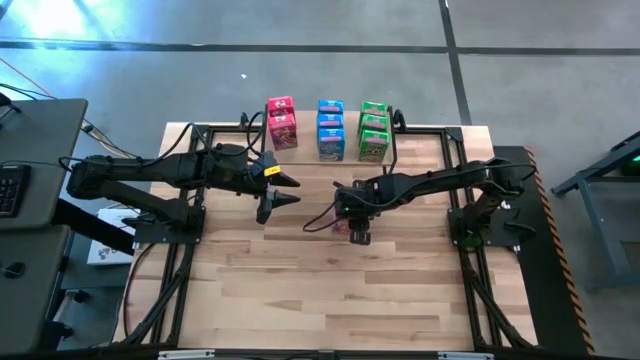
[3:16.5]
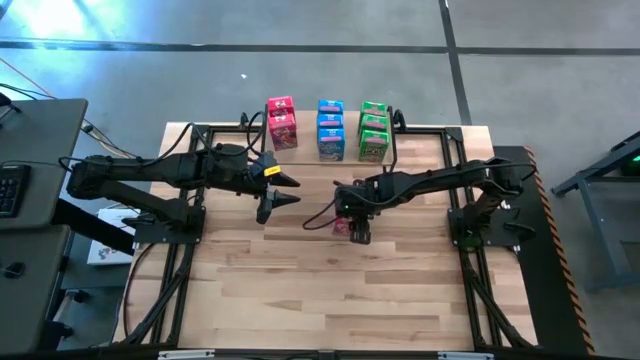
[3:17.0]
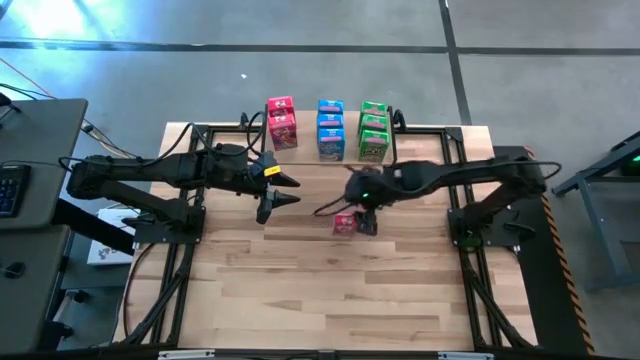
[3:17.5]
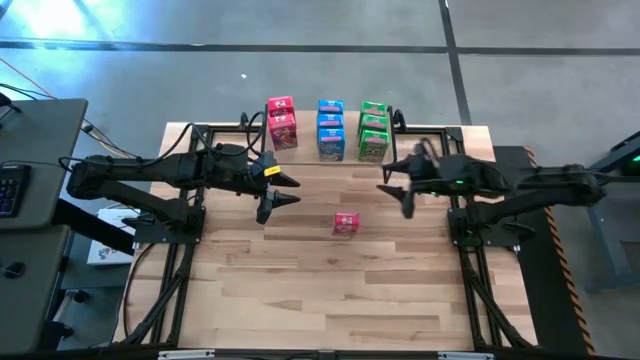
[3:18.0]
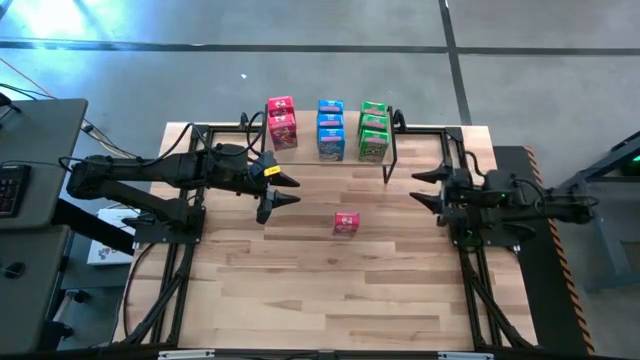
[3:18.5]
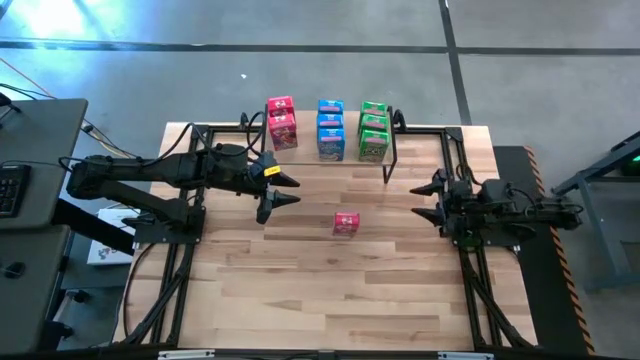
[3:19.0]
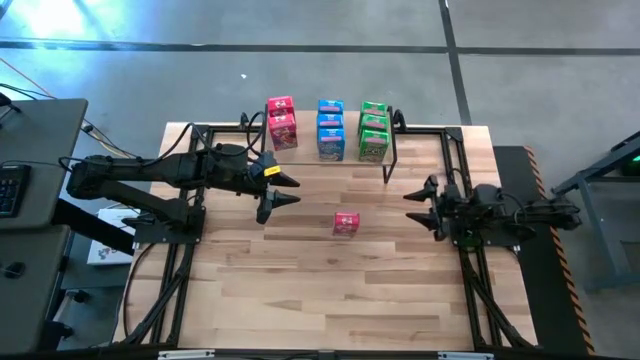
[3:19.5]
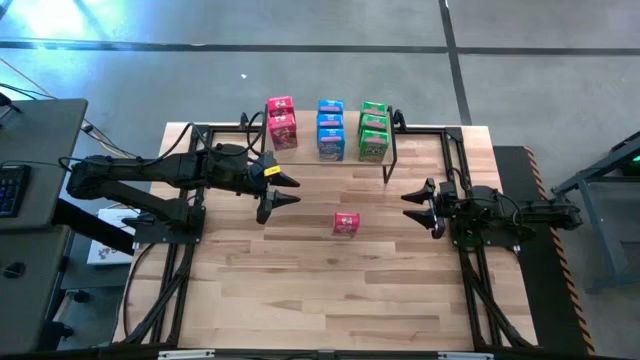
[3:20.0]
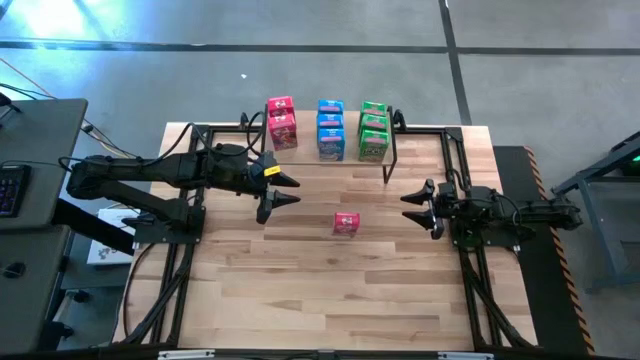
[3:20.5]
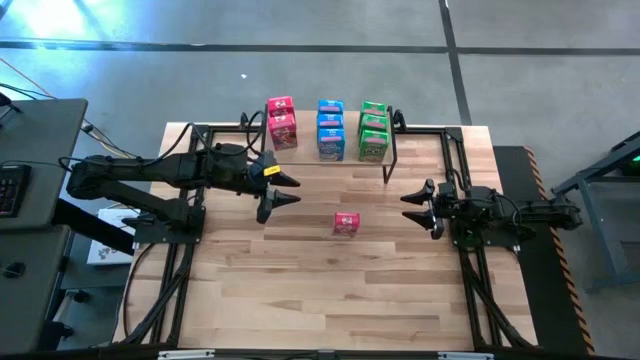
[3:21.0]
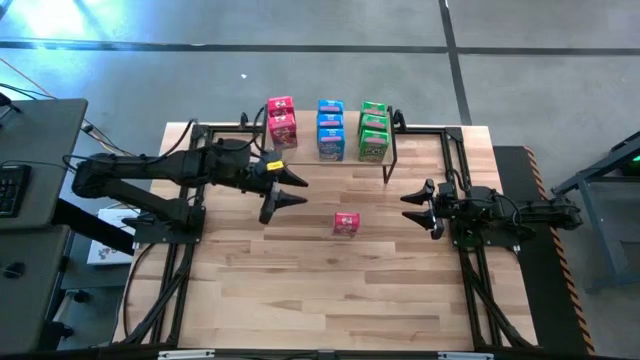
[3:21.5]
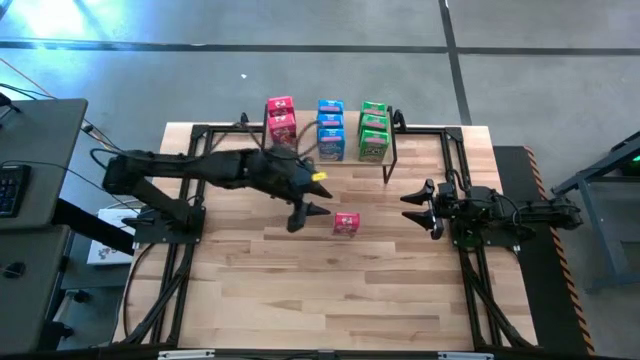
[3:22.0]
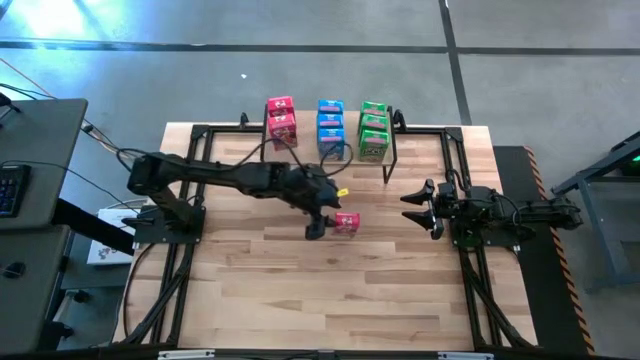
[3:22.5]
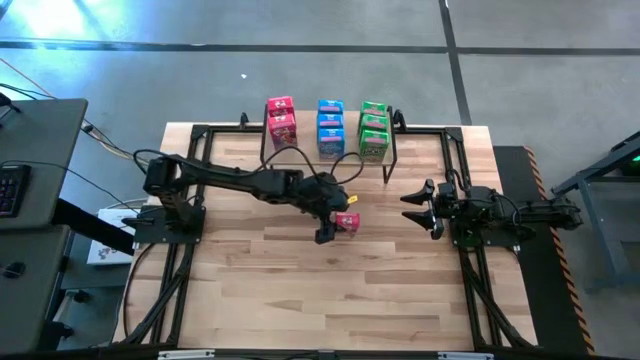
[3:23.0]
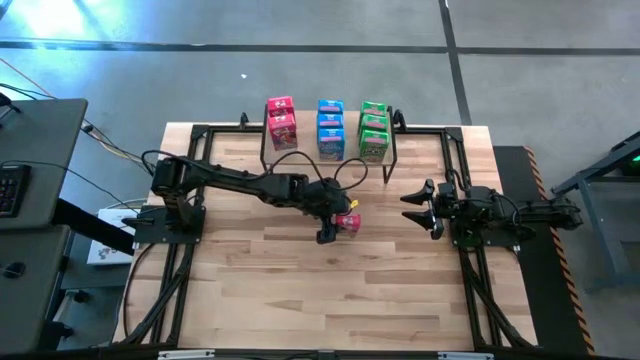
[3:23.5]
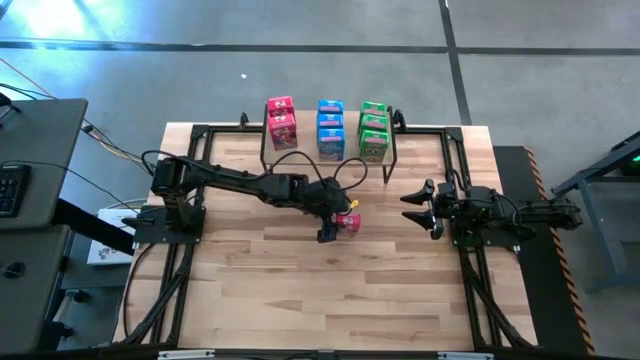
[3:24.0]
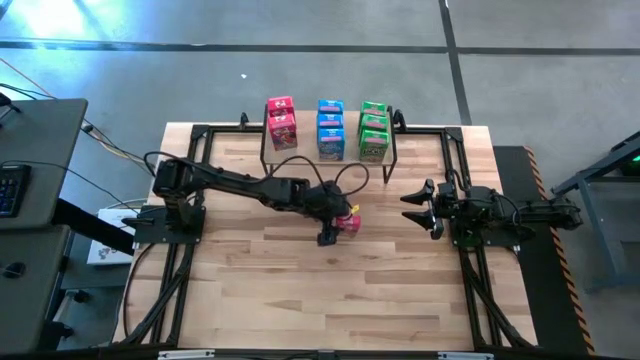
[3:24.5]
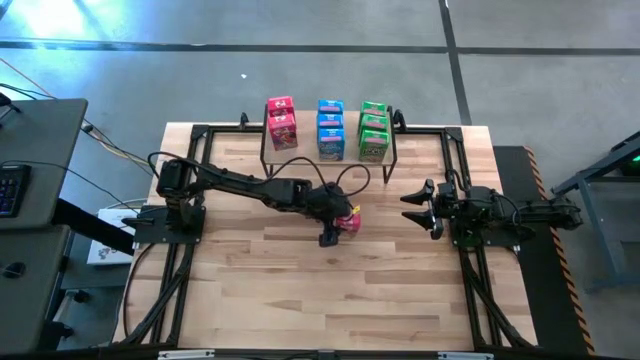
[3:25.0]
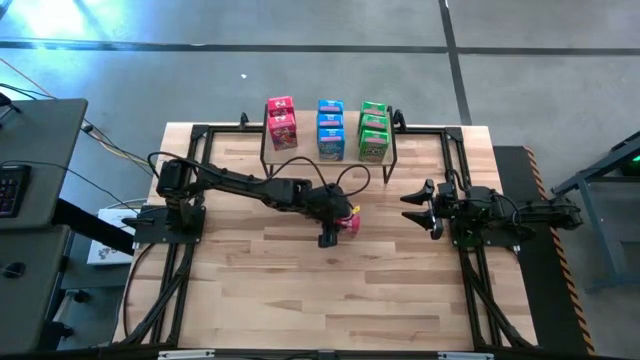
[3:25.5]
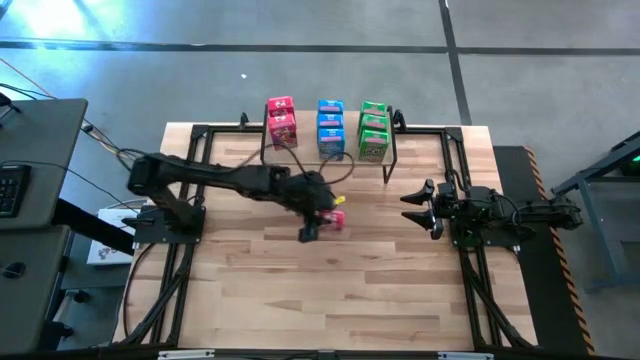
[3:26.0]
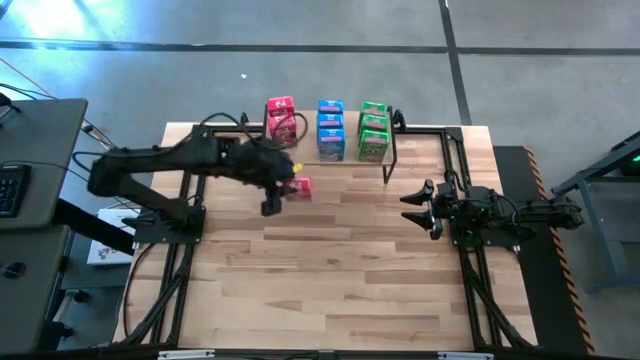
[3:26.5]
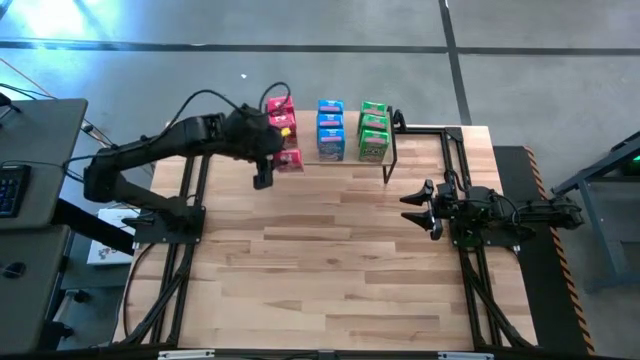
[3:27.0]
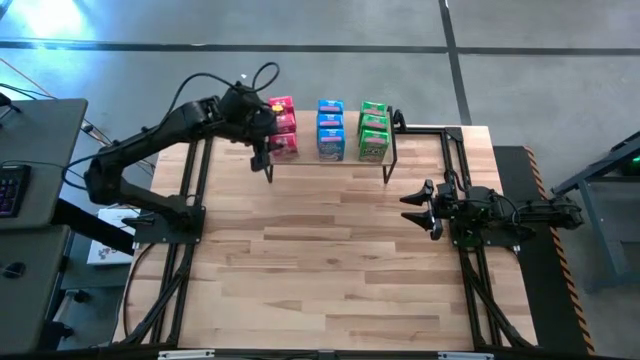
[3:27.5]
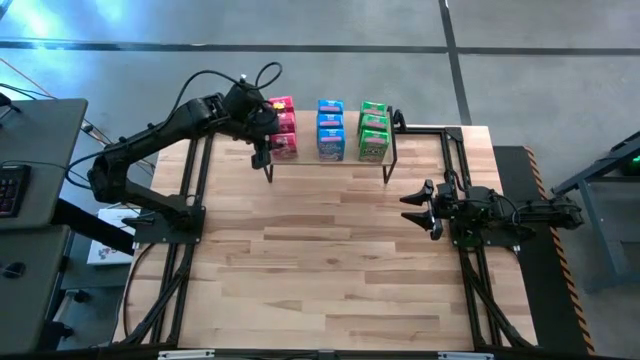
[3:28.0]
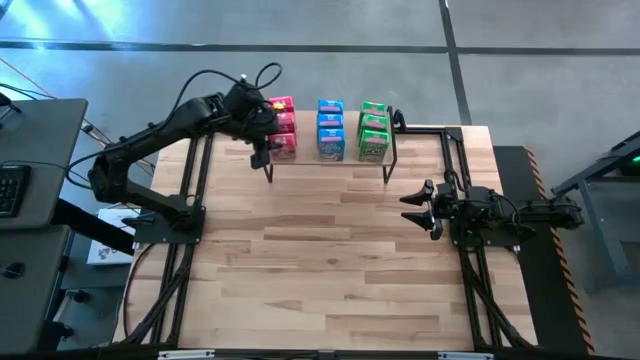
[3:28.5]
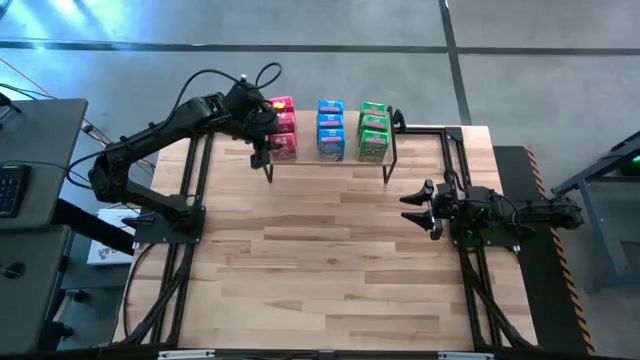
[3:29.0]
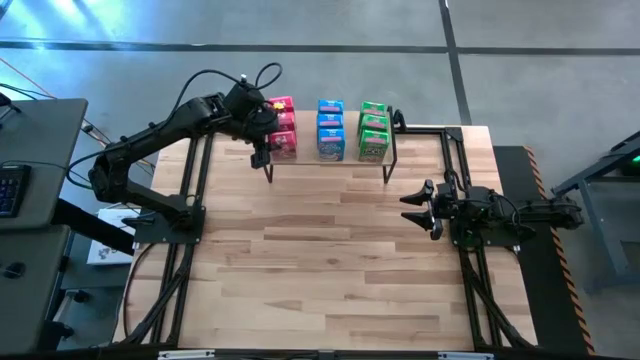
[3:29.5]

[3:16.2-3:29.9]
Task: Stack cereal on shelf
Put the red cereal box on the center of the table aligned with the other red cereal boxes

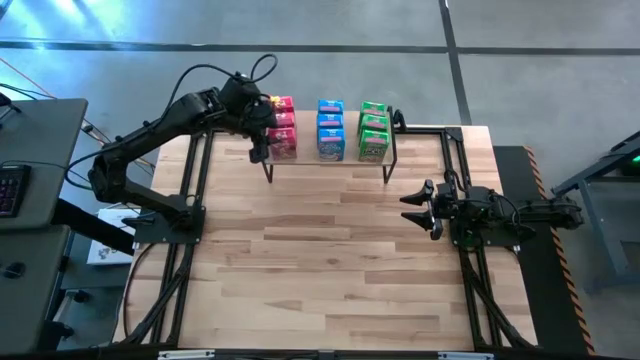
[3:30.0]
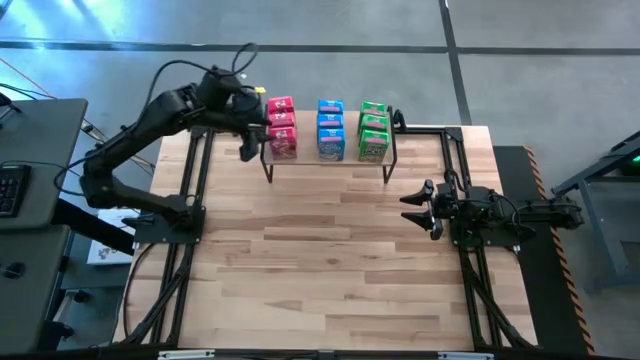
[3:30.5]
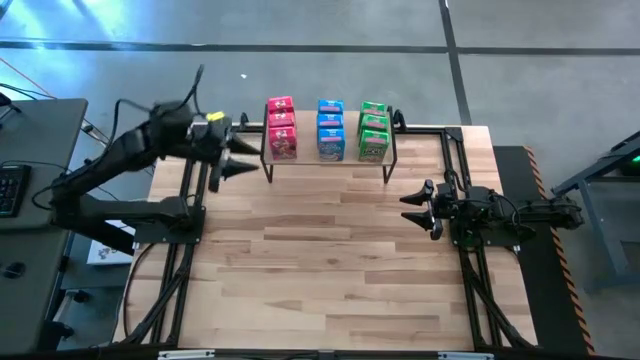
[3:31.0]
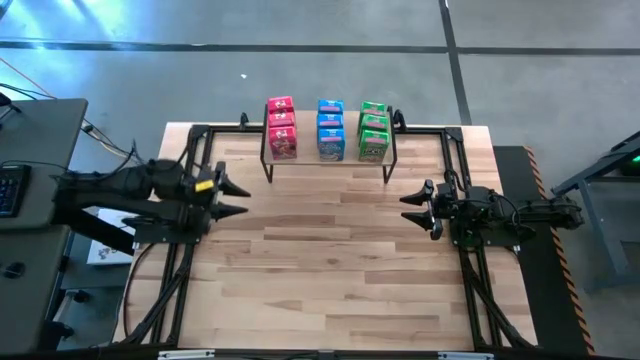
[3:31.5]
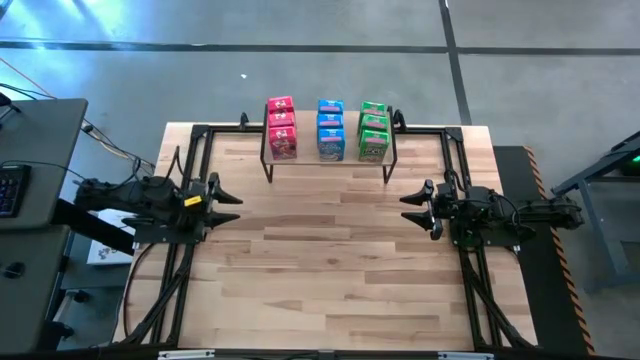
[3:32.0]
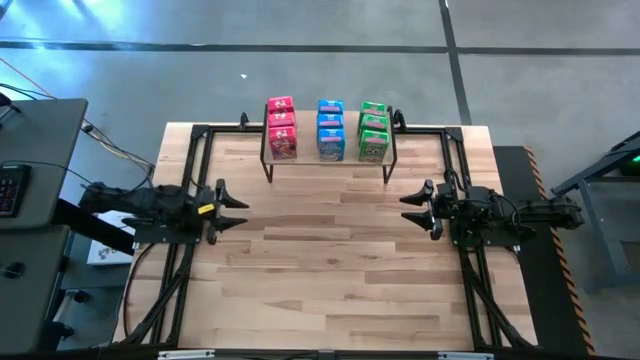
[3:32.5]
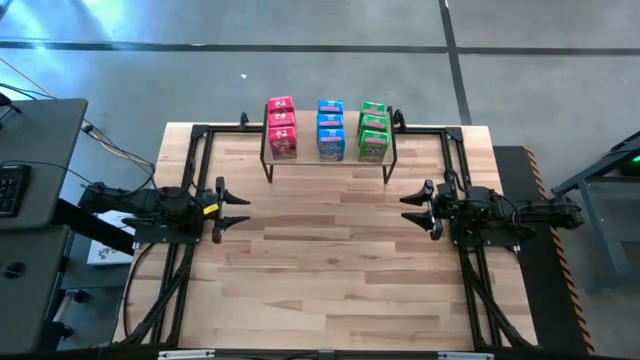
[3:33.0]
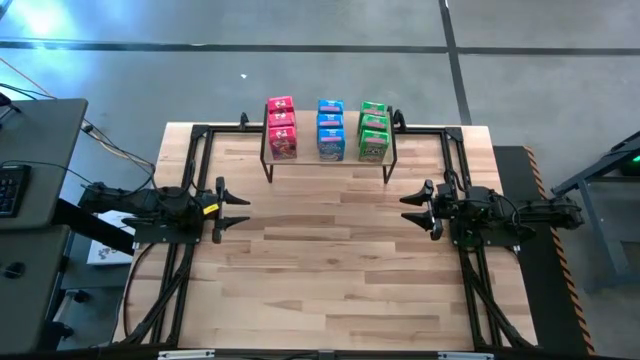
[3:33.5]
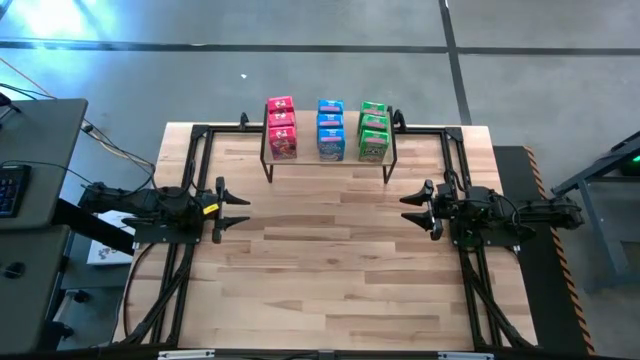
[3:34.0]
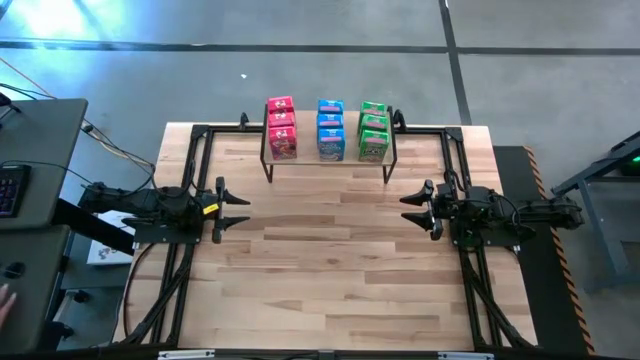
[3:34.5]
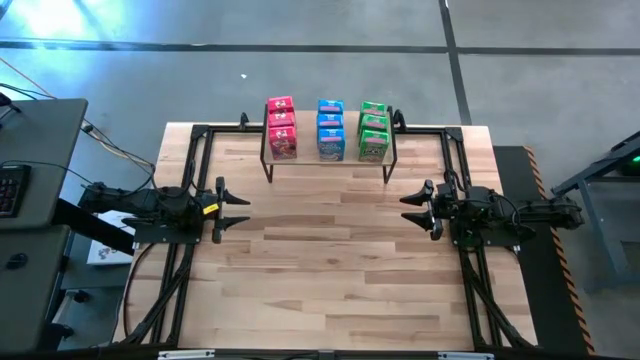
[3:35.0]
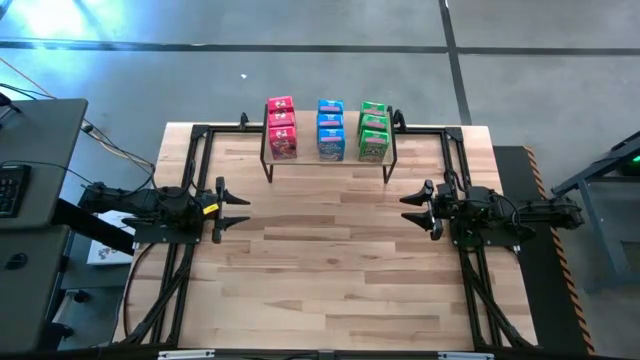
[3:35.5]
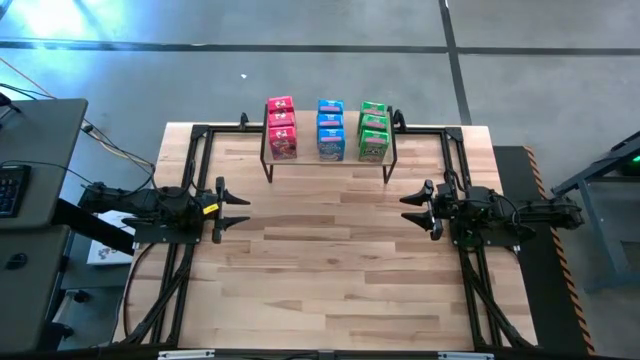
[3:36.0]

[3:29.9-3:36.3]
Return to Home Position

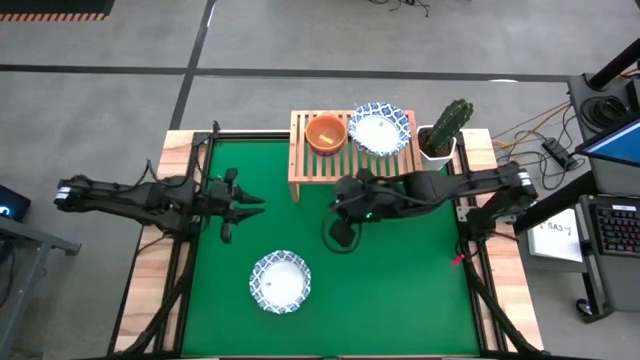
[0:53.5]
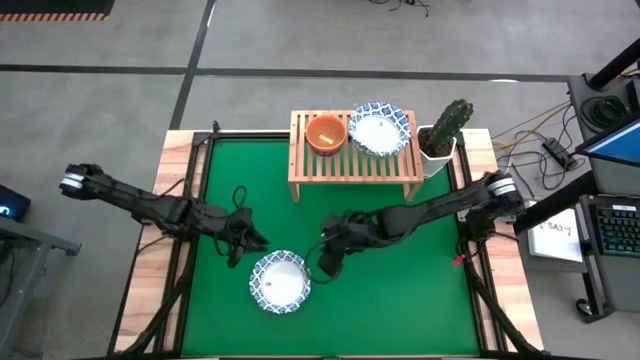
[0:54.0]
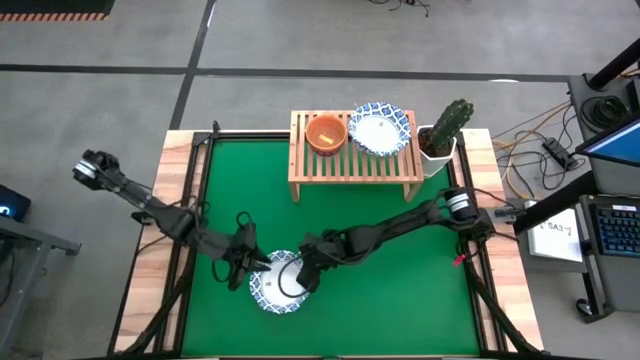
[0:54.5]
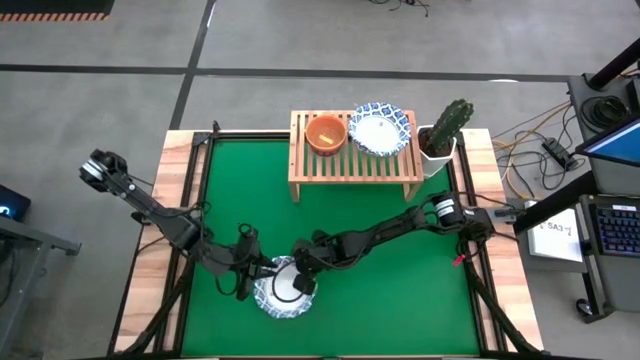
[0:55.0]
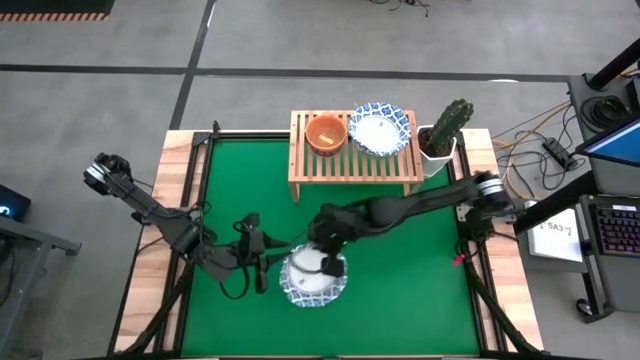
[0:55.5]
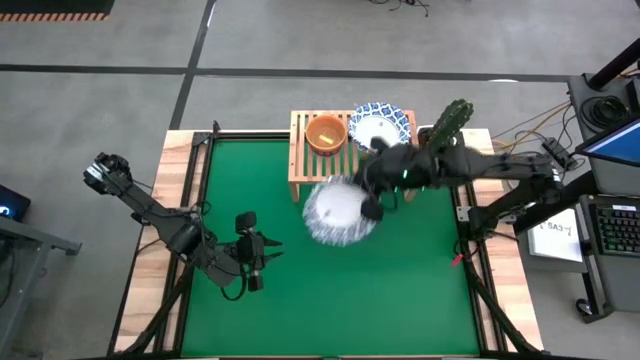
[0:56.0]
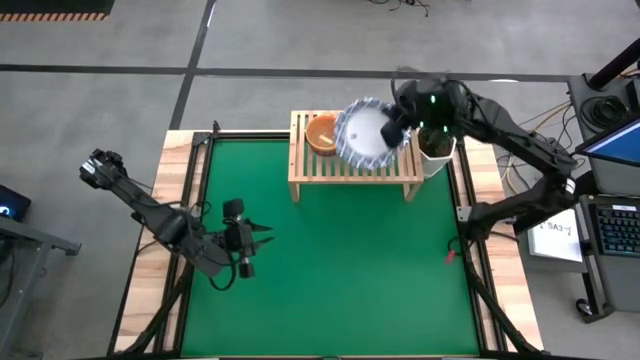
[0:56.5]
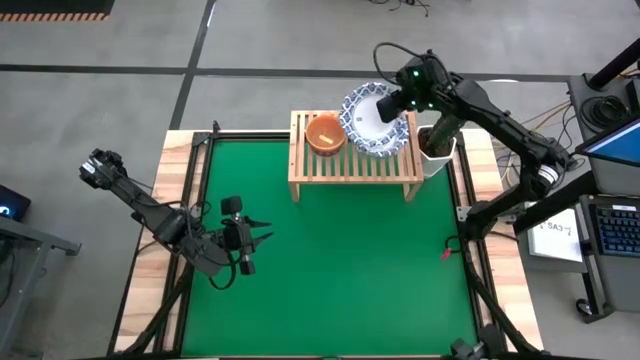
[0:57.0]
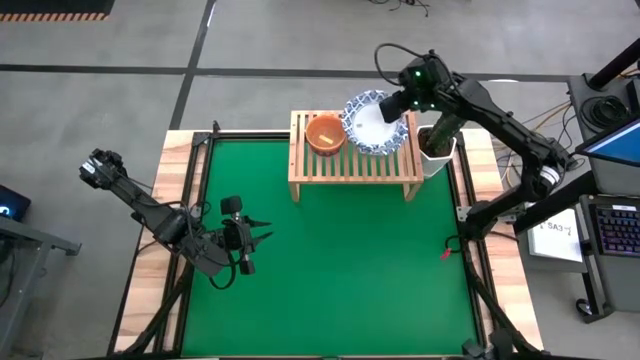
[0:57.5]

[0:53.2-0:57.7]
Task: Place and stack bowls onto a shelf
Stack the big white bowl on the big white bowl on the shelf
